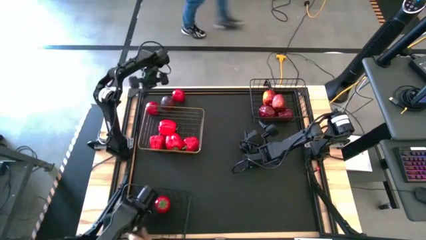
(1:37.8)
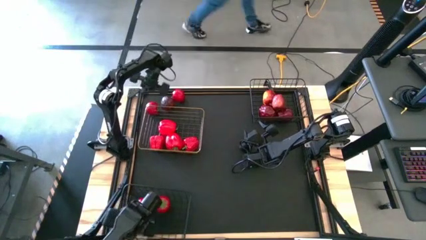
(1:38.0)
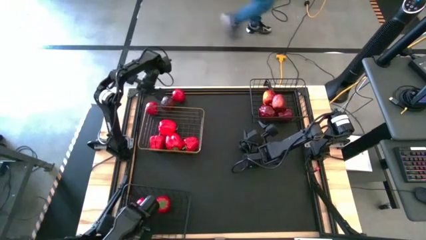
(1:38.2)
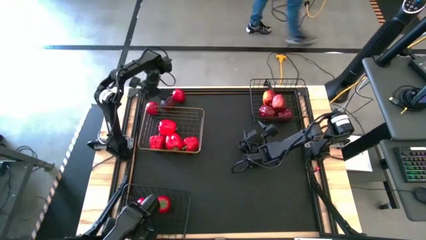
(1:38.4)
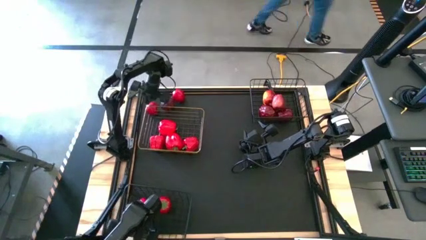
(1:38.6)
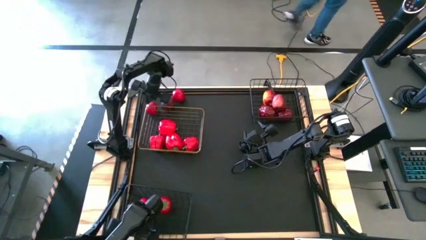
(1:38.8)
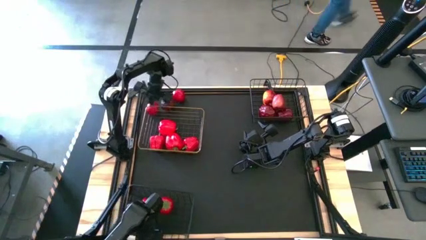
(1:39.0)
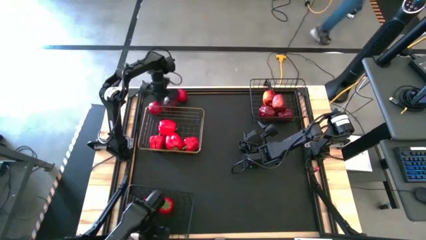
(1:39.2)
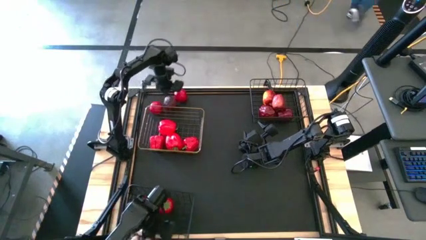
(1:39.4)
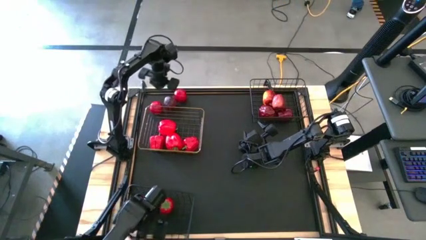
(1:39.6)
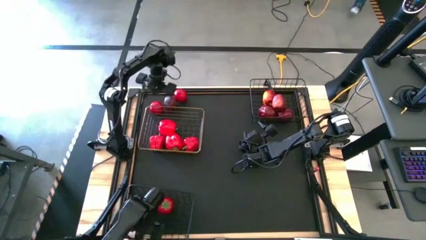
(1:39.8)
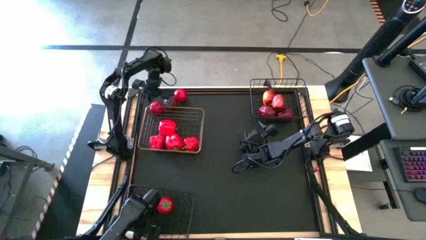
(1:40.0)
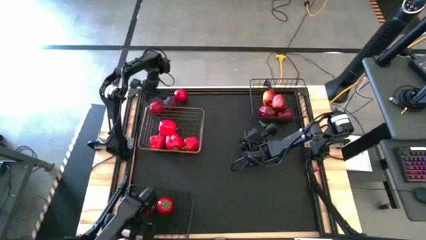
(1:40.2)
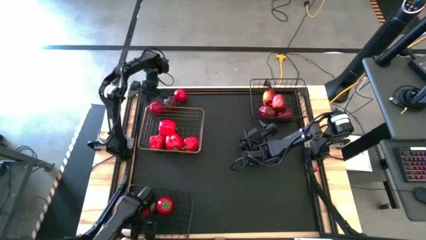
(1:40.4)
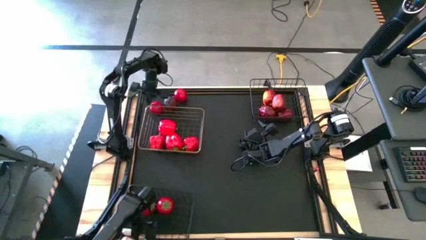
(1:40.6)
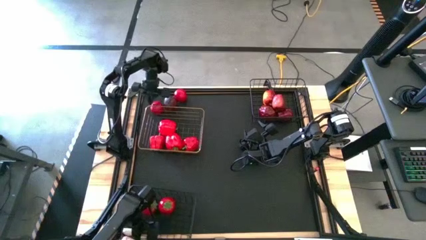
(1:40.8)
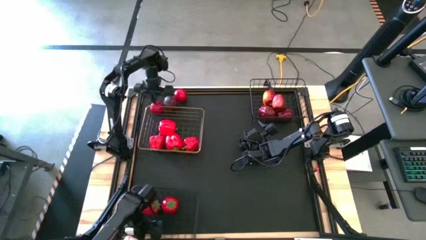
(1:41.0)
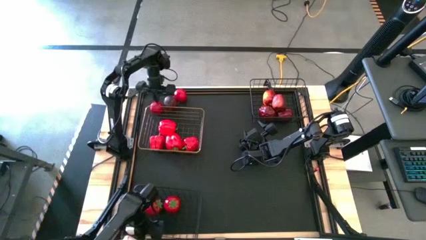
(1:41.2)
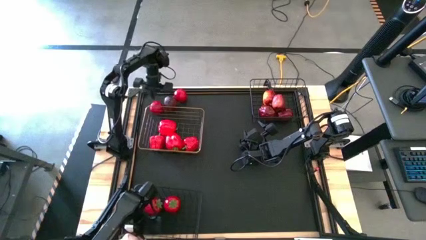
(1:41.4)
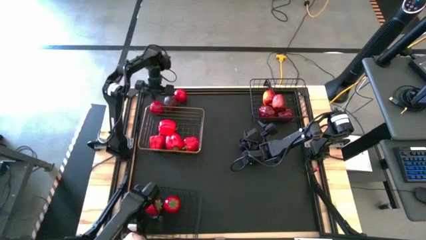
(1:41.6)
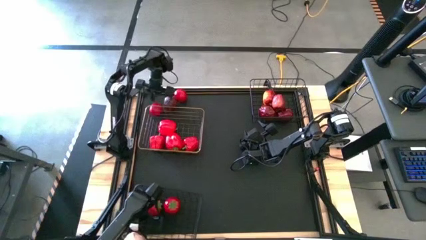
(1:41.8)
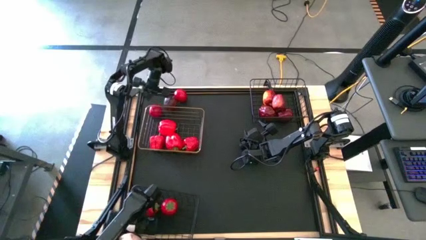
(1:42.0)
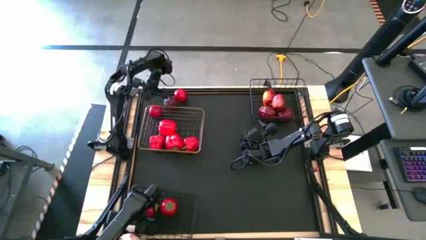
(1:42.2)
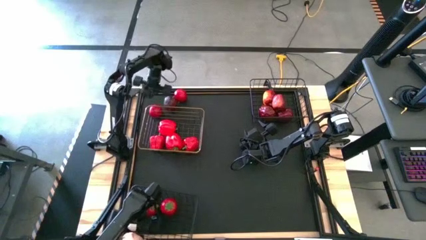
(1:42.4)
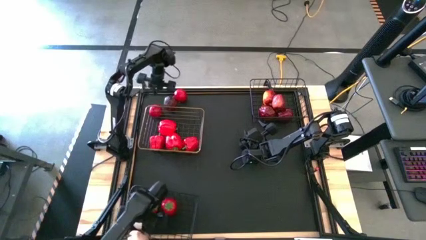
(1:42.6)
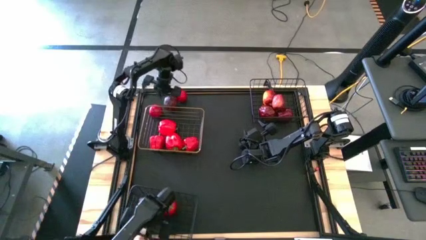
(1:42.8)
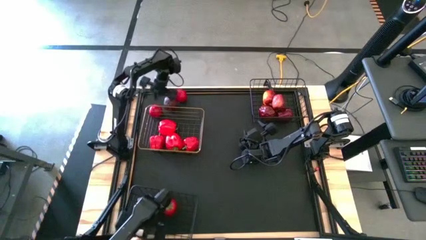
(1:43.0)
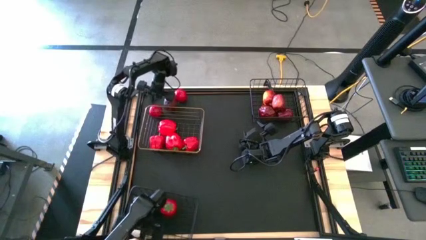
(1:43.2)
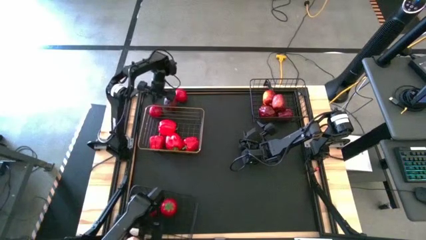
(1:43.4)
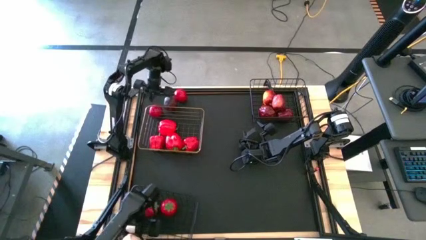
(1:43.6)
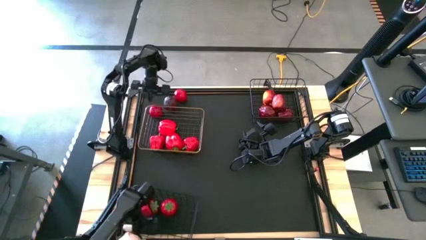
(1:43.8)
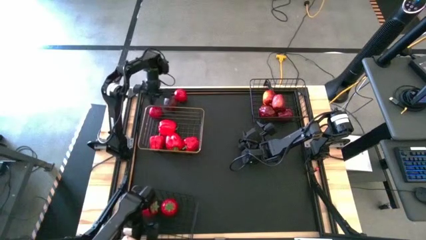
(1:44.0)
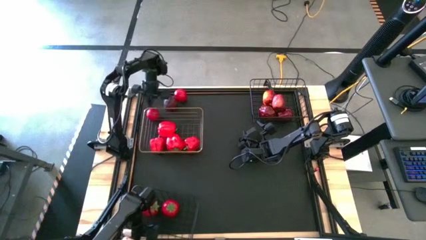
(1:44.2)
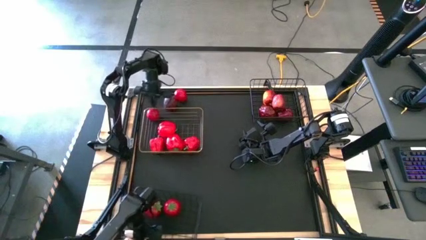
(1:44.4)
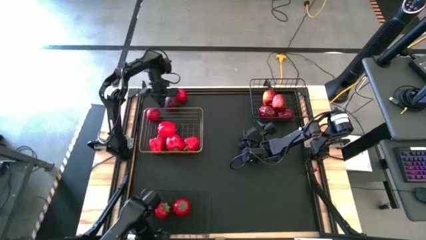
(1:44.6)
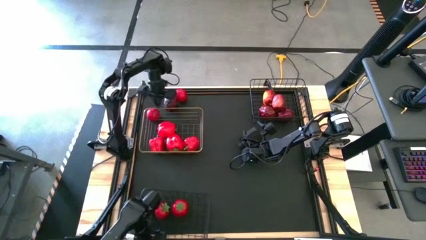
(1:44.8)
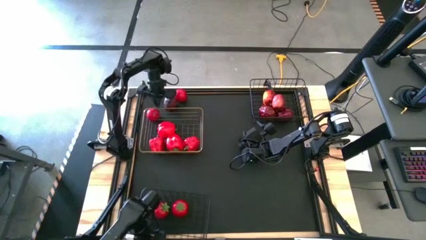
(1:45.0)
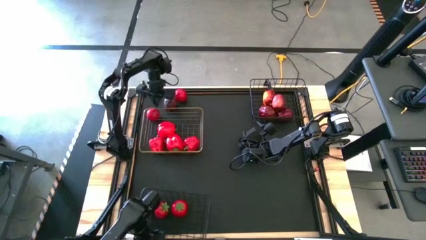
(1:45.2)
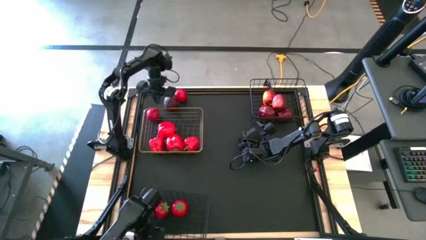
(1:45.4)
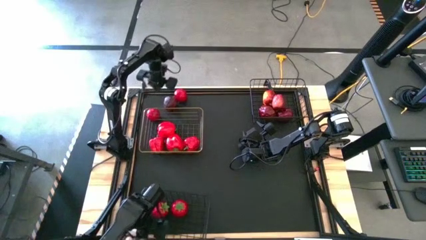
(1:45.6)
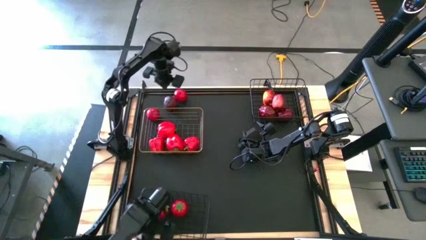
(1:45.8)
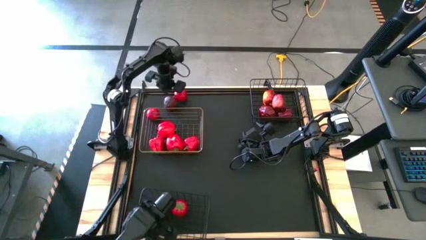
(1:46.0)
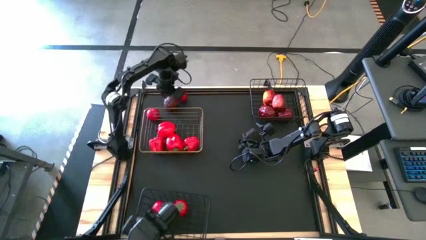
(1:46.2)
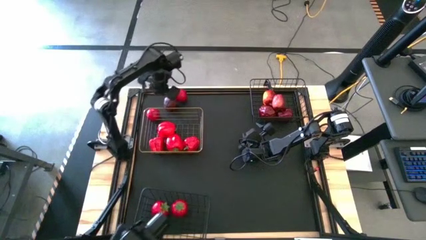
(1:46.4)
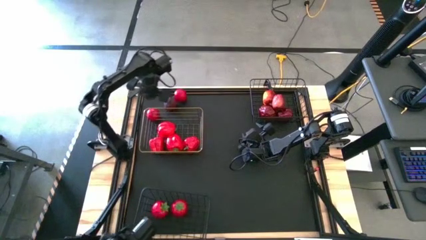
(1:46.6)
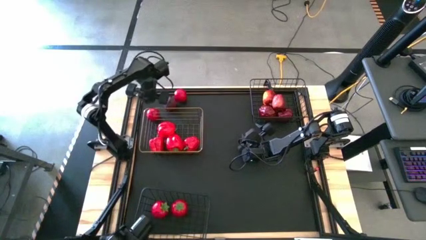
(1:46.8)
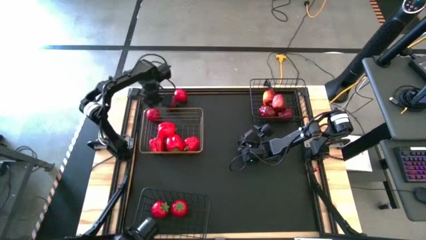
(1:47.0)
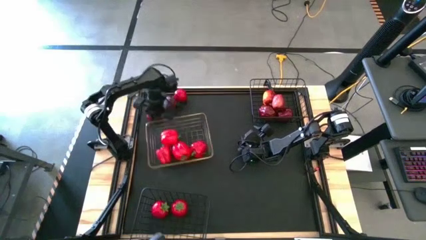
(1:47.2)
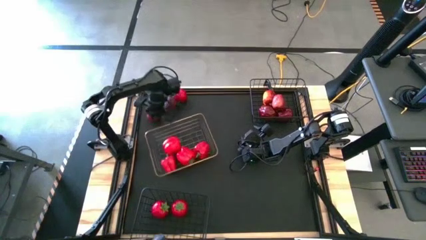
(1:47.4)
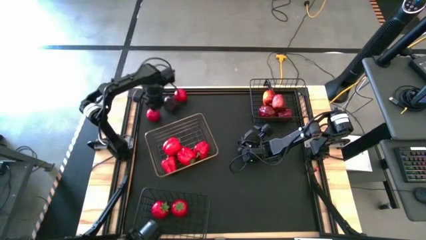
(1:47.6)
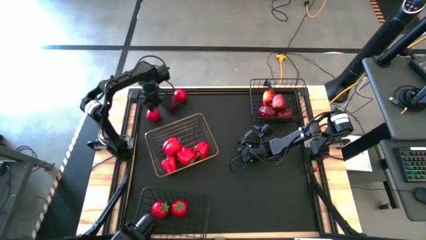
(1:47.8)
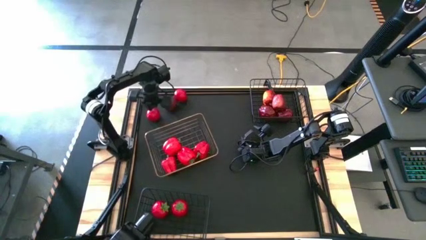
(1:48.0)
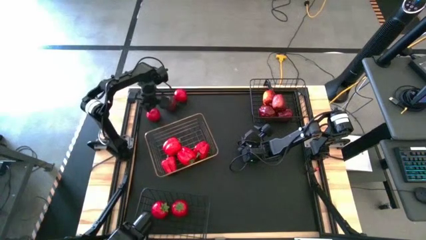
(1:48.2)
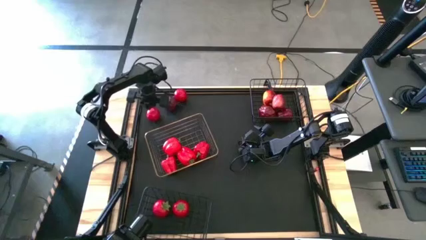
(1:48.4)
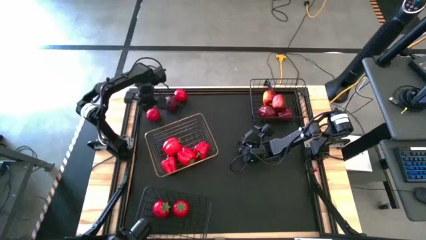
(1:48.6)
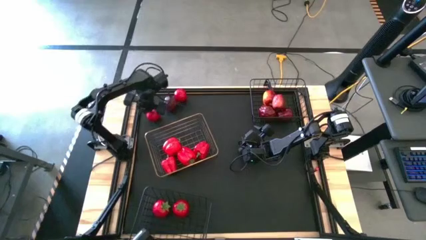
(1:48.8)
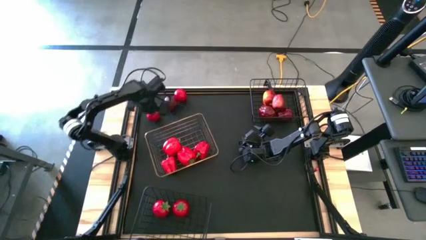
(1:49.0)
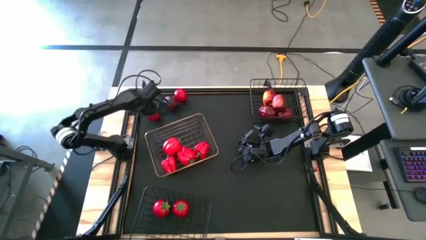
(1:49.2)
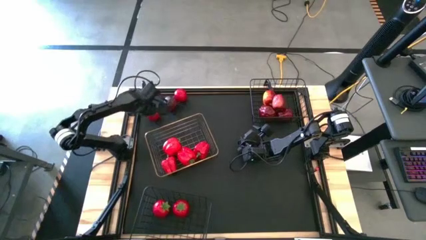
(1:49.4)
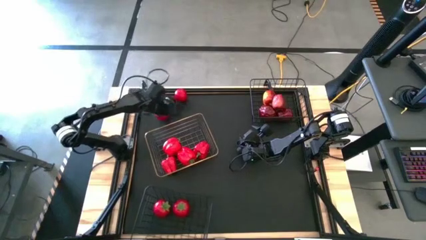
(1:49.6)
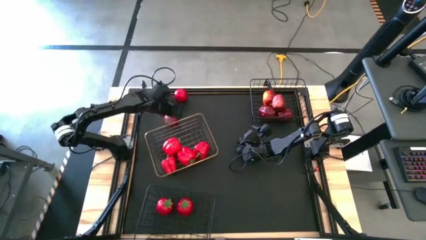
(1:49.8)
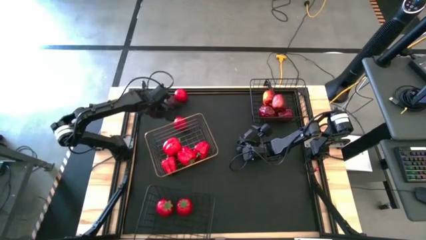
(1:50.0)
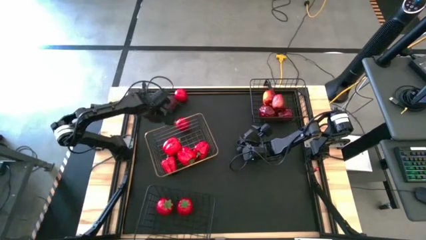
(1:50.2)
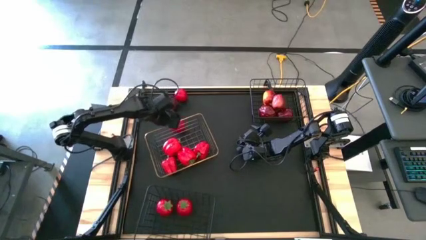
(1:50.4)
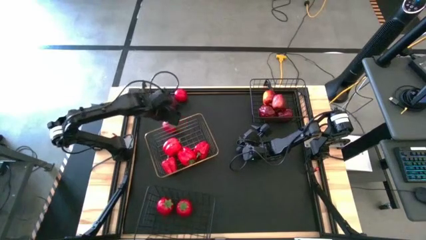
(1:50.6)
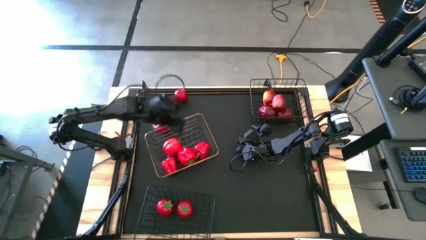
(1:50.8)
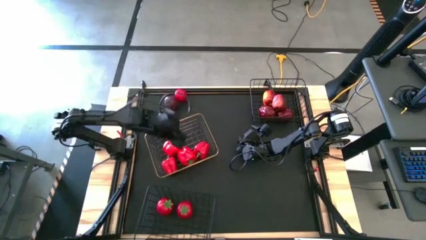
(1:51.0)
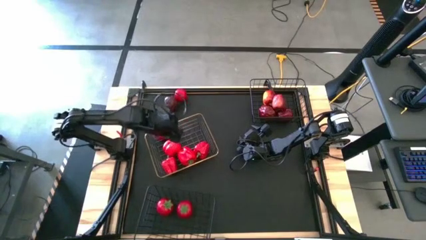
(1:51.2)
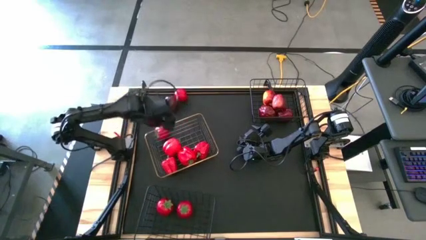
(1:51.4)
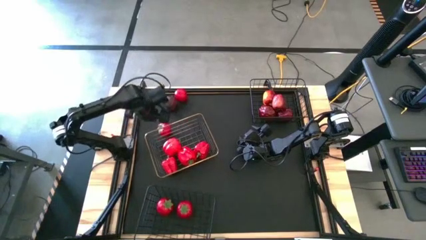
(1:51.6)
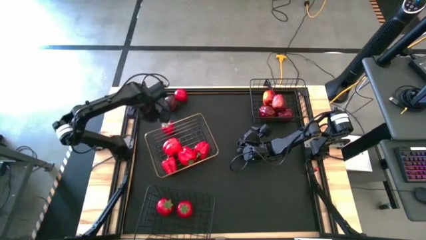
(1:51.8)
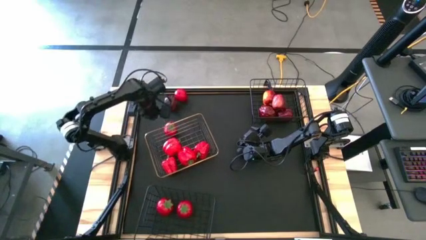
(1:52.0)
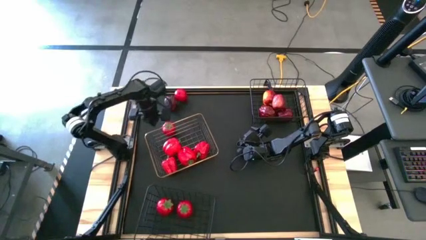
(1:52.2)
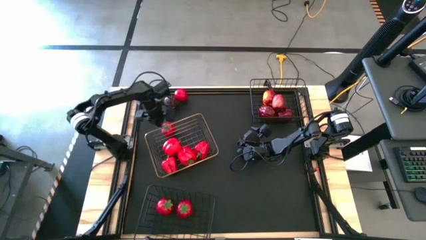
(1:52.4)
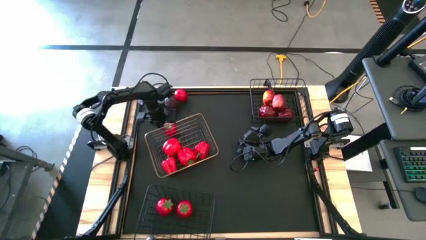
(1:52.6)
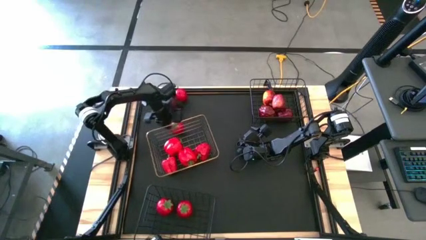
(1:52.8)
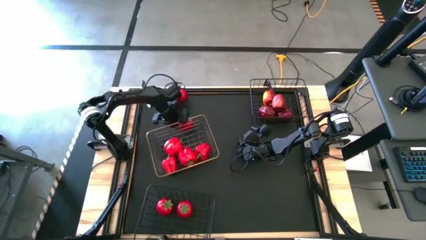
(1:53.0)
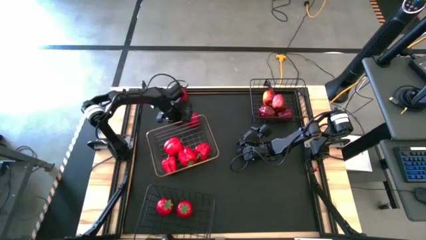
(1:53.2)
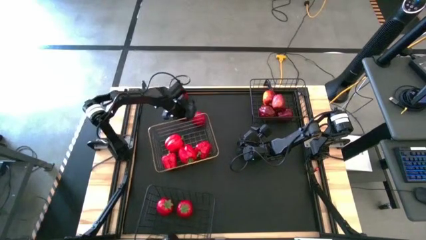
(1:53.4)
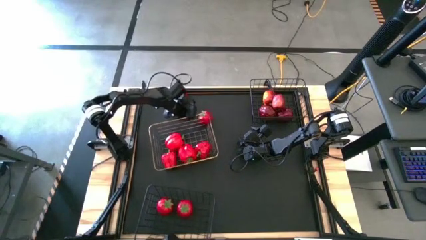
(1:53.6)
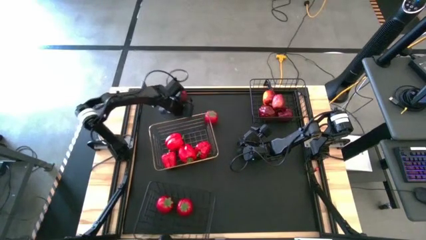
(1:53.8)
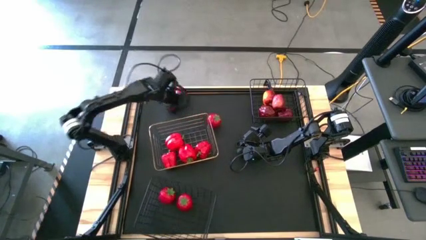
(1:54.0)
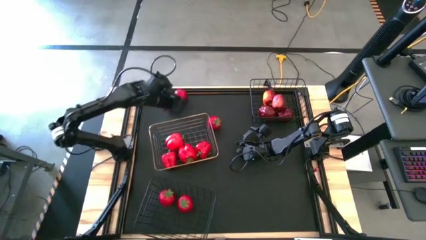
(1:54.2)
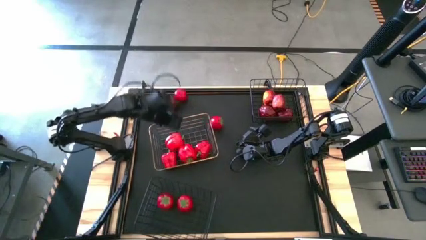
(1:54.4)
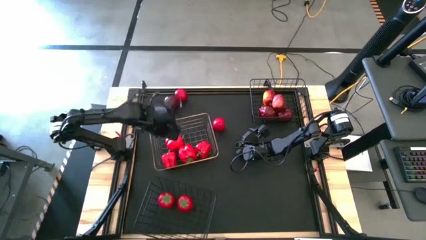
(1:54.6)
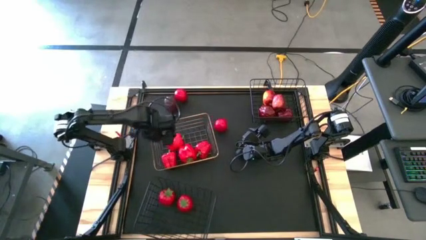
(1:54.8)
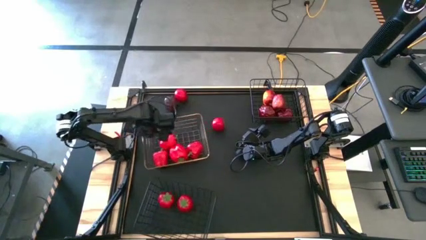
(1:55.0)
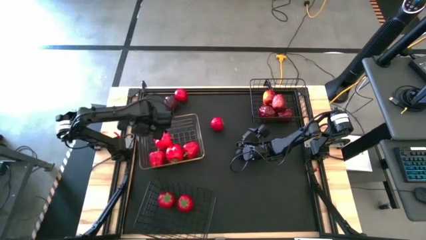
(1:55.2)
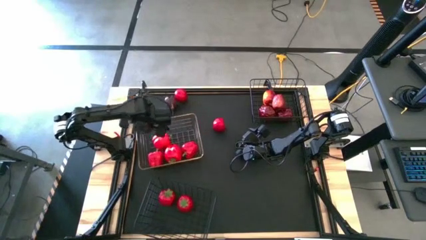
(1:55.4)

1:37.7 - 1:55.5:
Task: Sort produce into baskets
Move the tomato from the top left to the top center of the table
